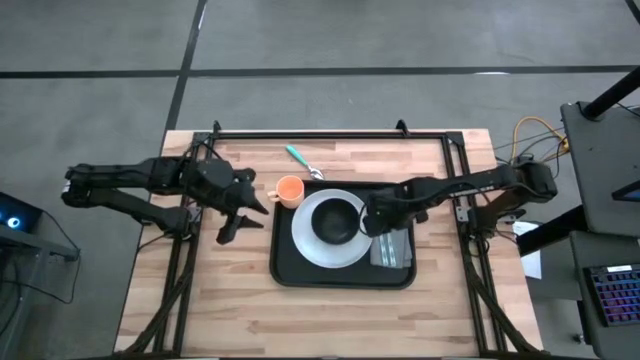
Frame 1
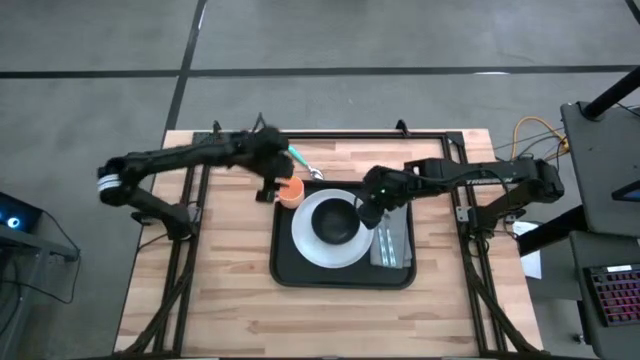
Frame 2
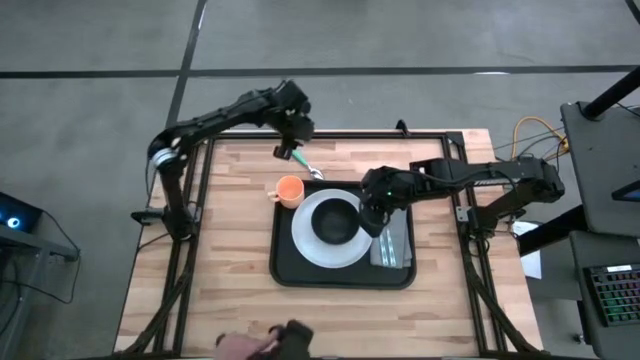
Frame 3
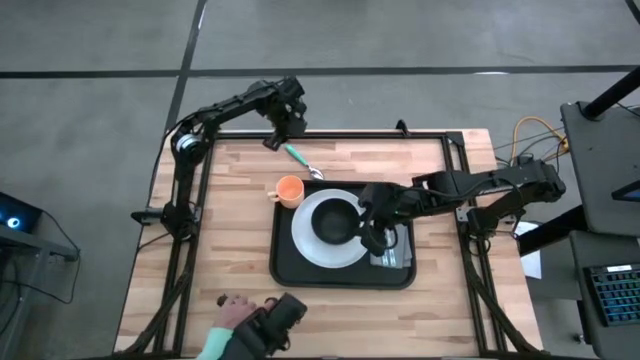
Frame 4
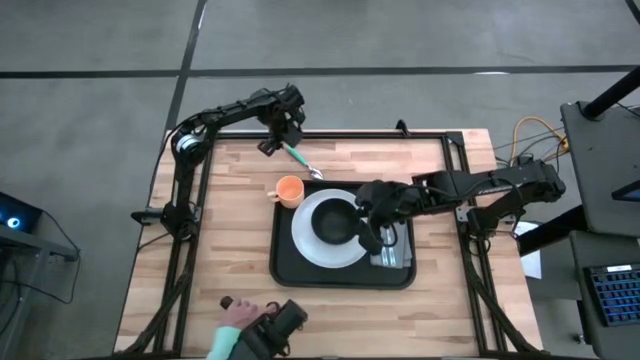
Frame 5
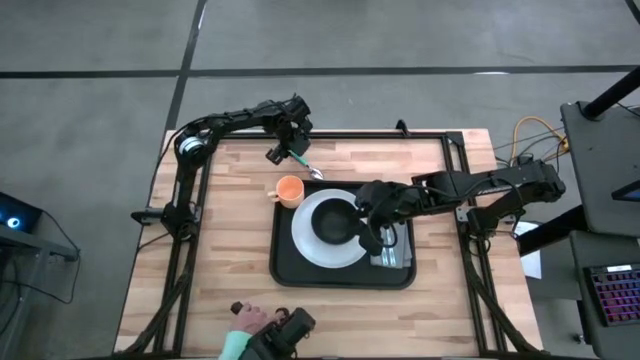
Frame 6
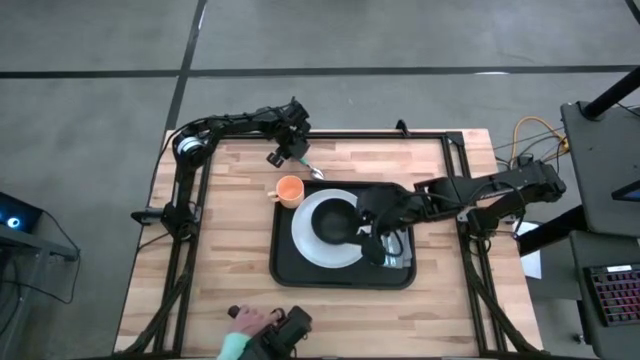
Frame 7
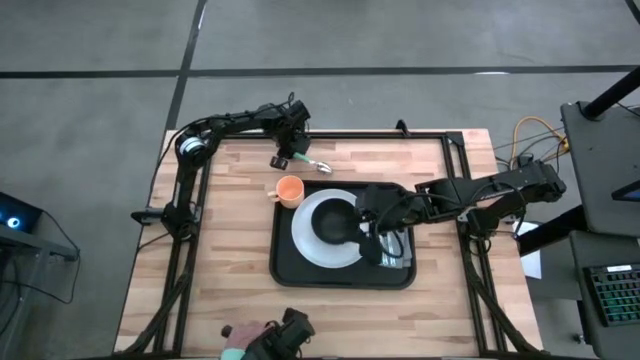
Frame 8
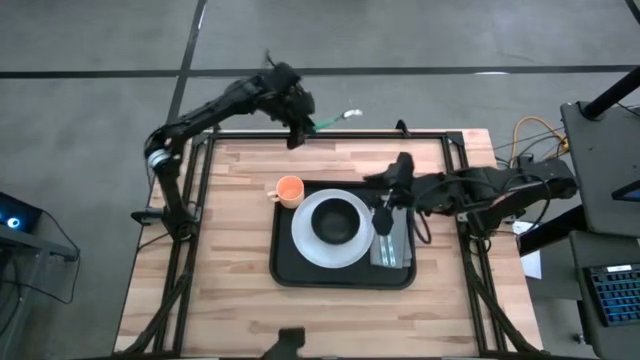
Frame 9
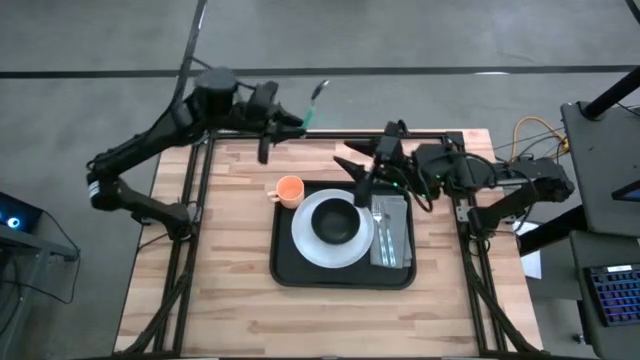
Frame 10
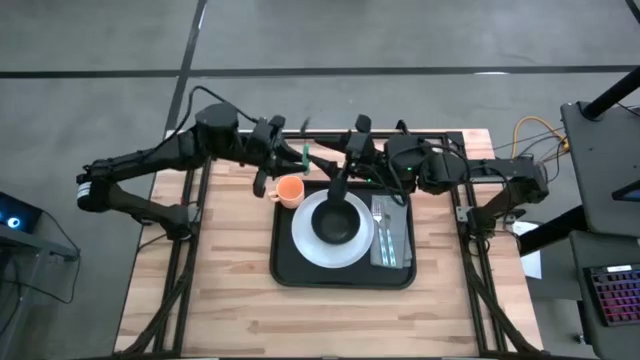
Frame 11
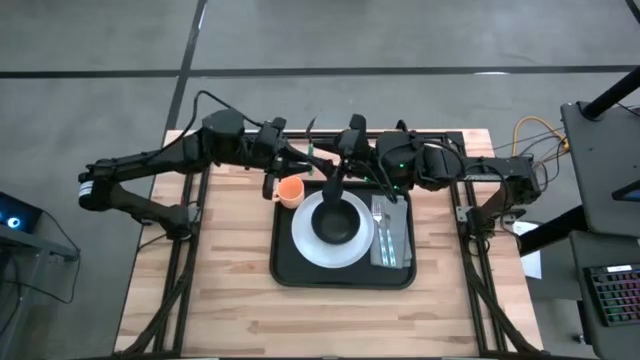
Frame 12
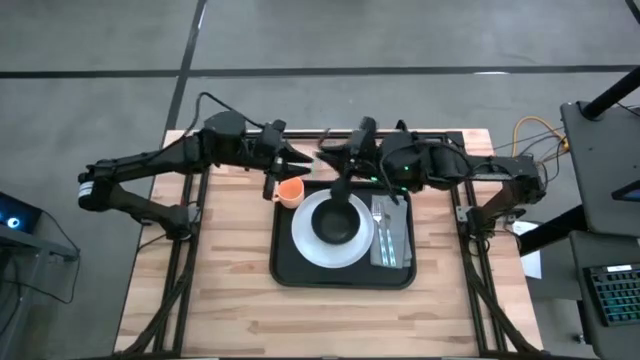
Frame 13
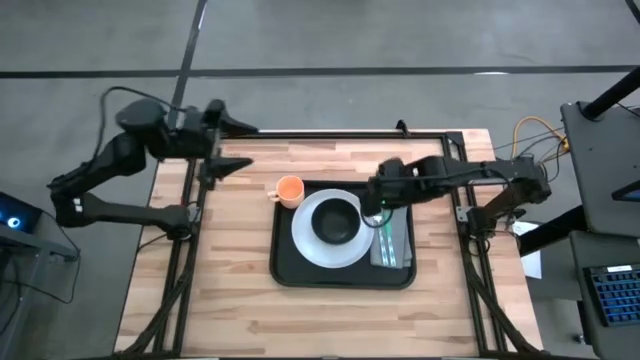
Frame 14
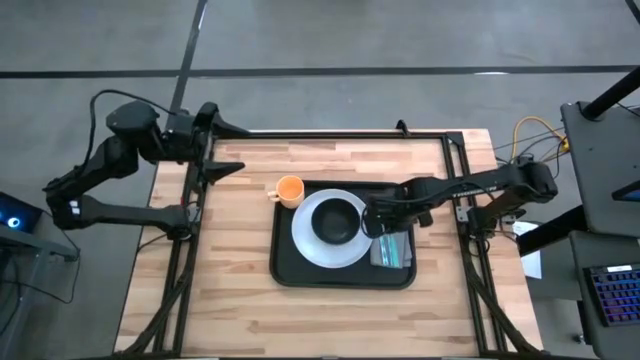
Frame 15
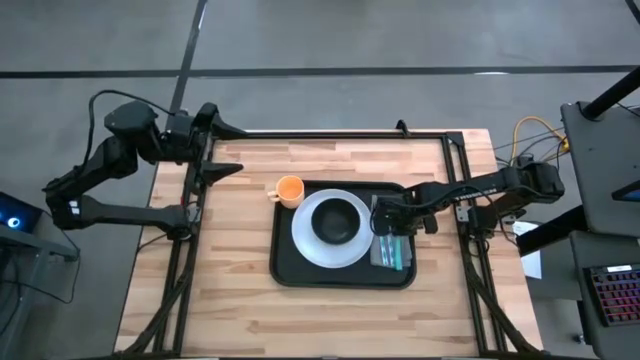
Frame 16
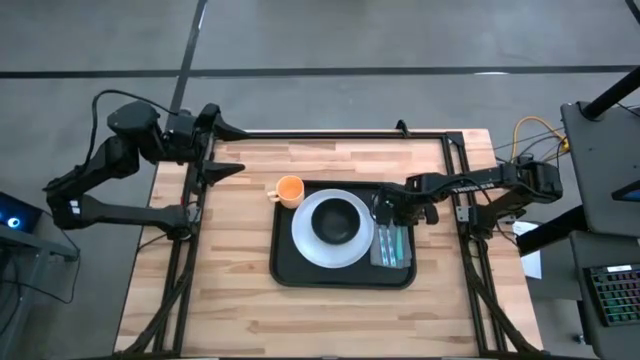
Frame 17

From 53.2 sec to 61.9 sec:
Task: Set up tray
Put the blue spoon on the gray napkin to the right of the blue knife

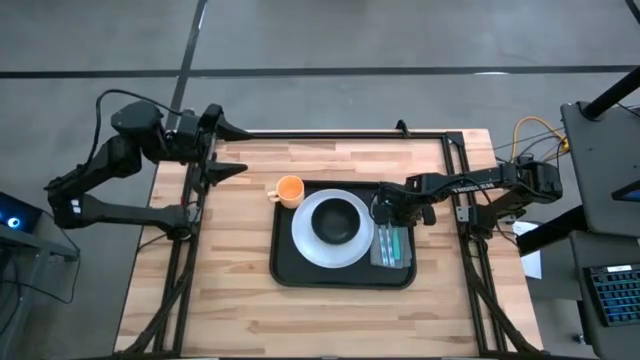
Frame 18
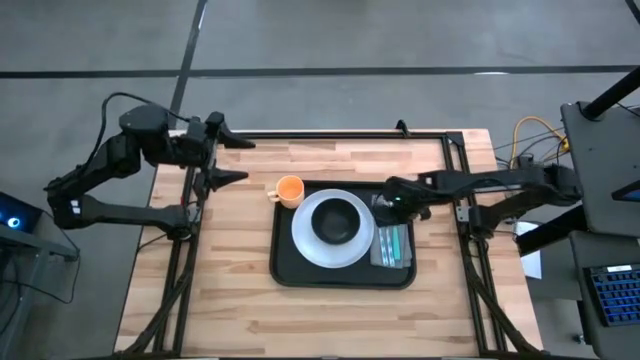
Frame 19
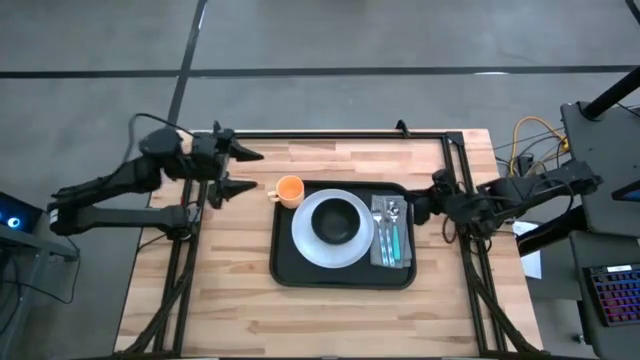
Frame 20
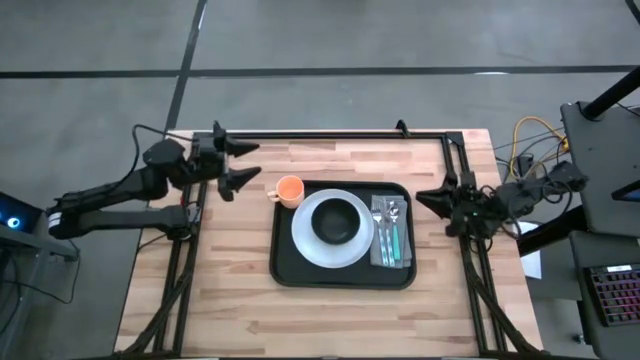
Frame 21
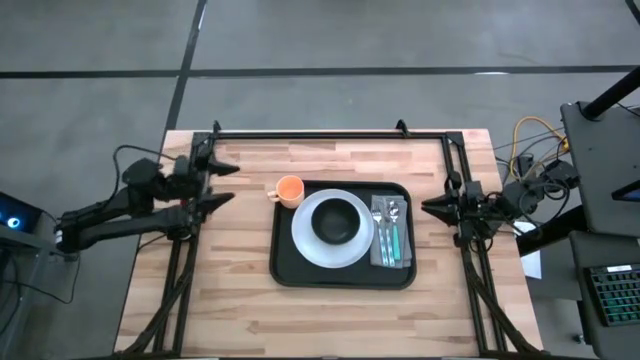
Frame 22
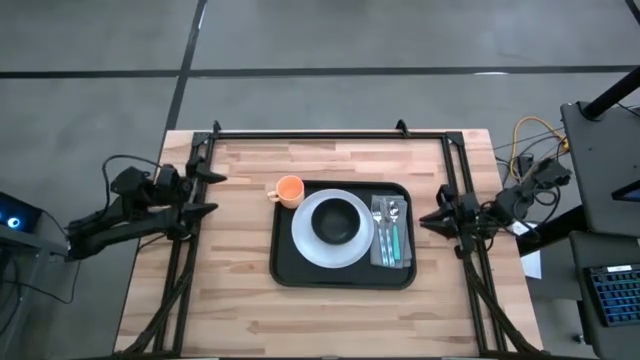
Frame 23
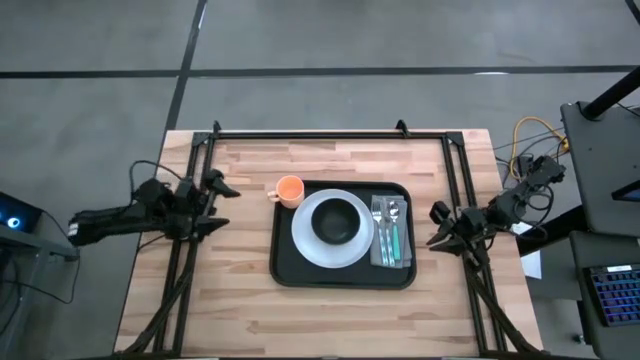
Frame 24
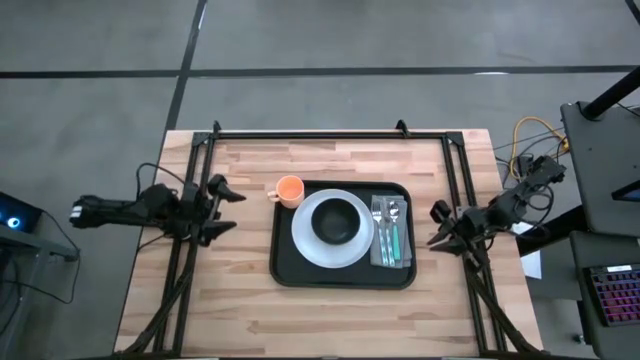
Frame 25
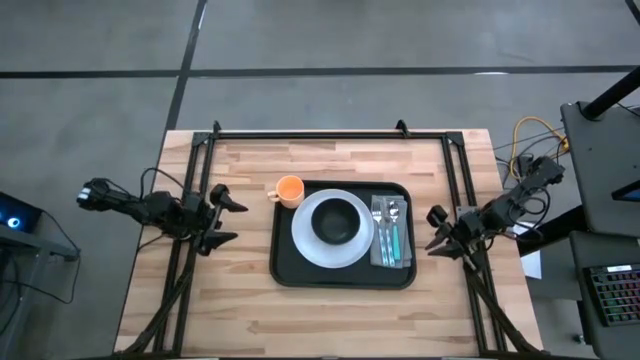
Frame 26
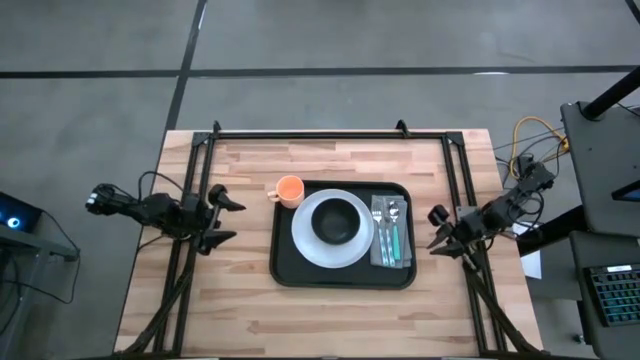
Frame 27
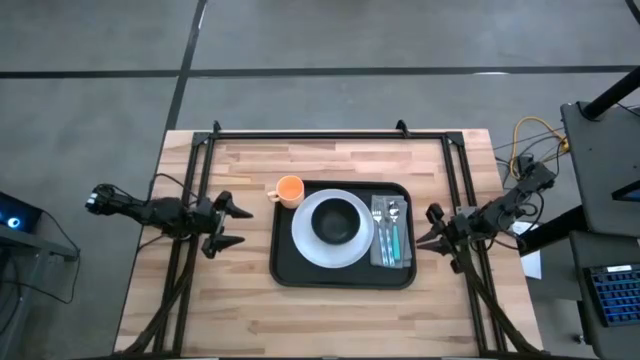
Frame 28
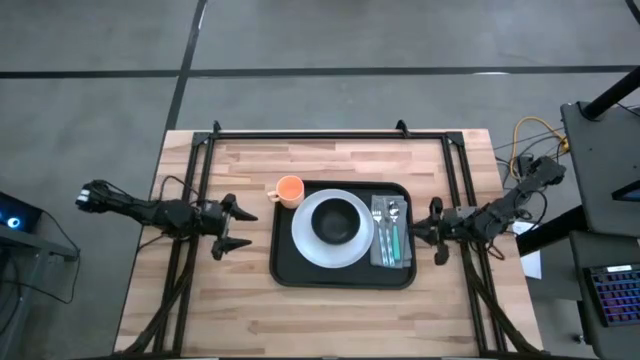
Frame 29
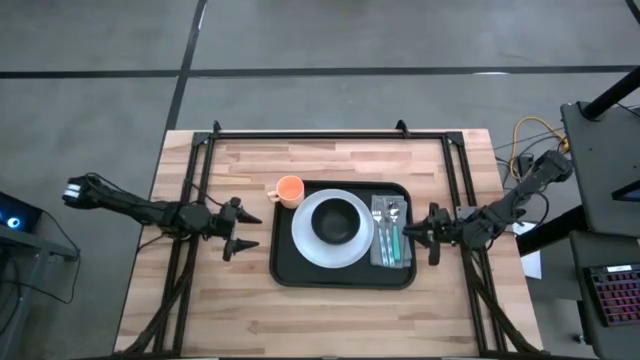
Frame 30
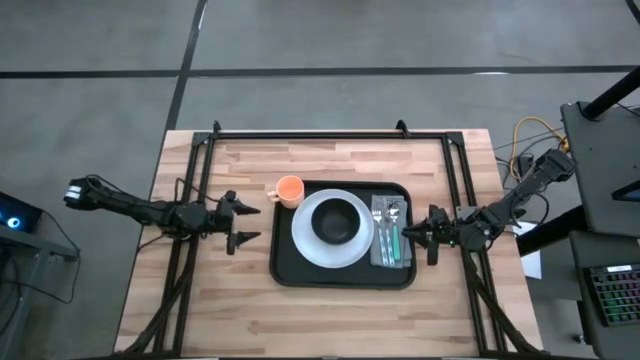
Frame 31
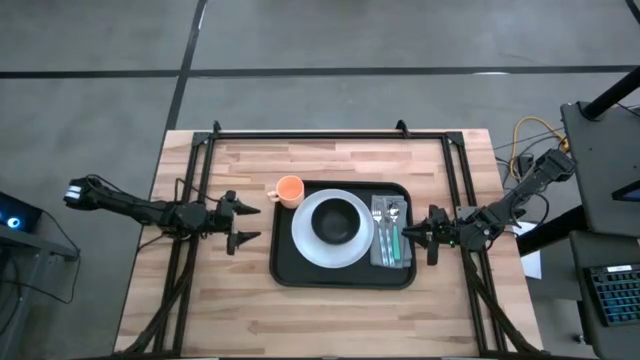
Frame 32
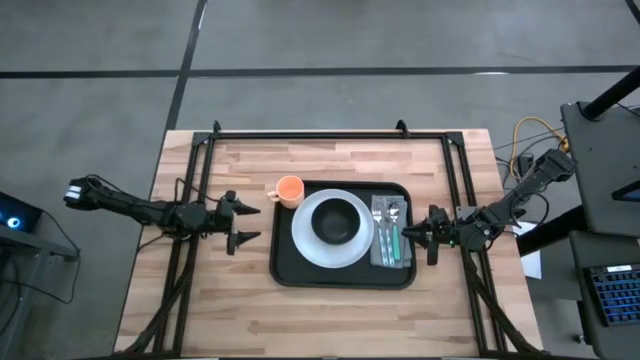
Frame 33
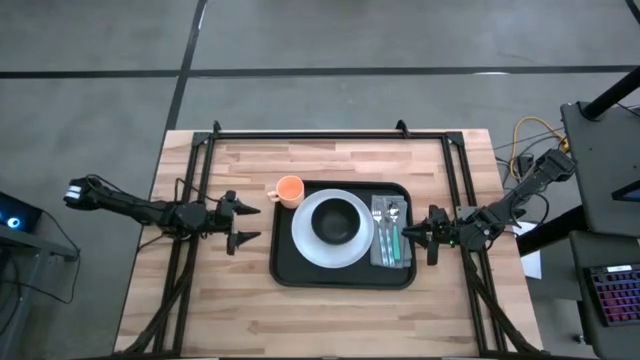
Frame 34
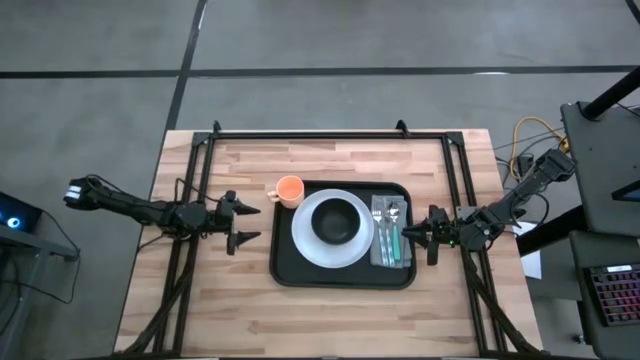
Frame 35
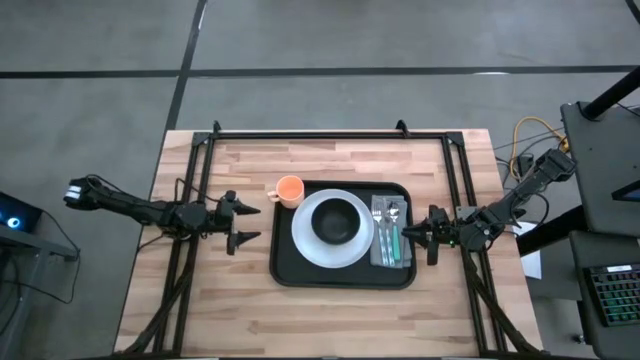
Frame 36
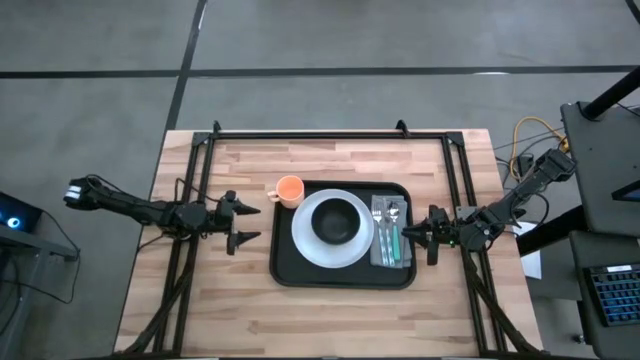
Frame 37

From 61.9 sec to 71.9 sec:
Return to Home Position

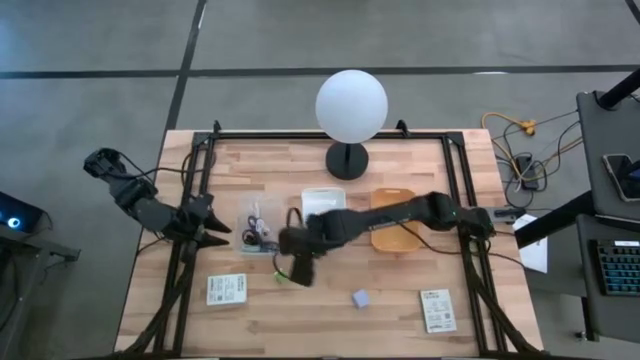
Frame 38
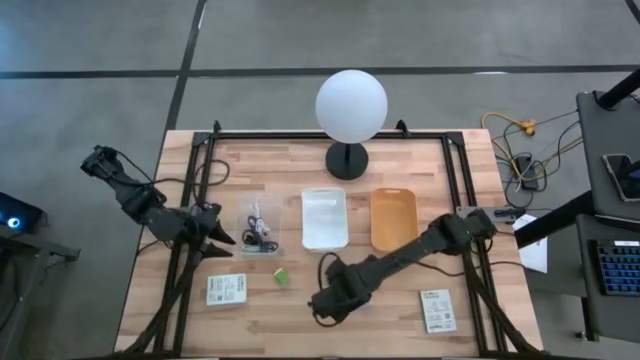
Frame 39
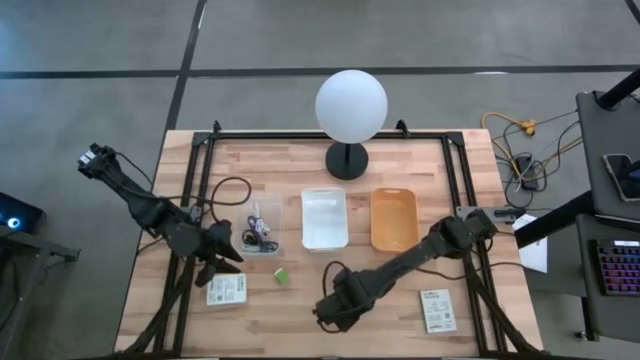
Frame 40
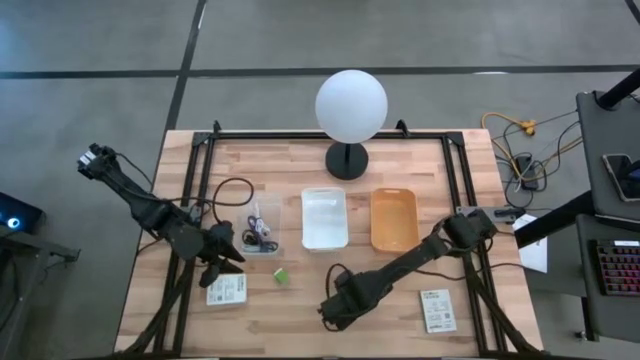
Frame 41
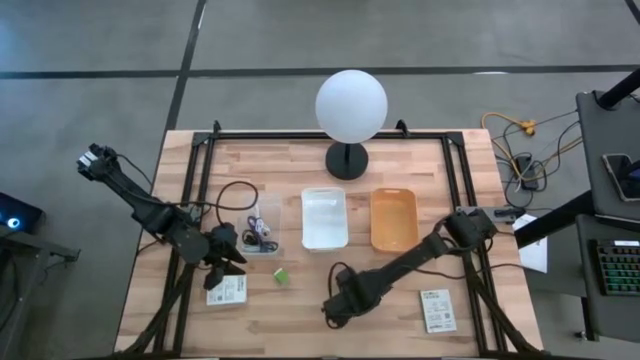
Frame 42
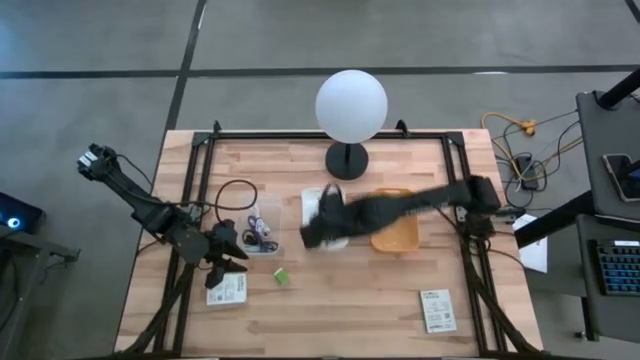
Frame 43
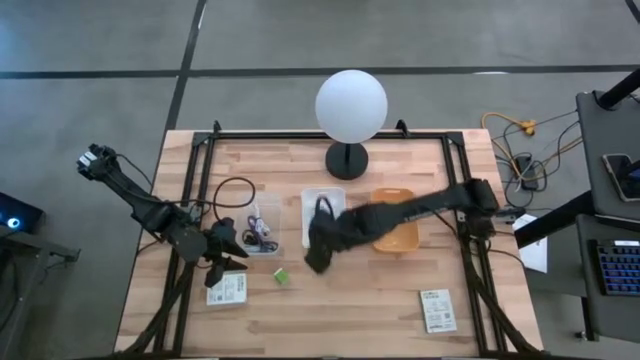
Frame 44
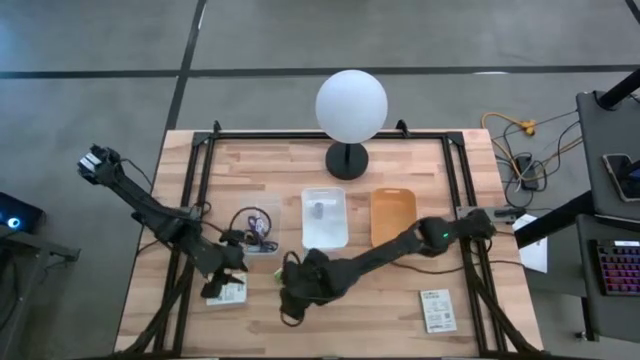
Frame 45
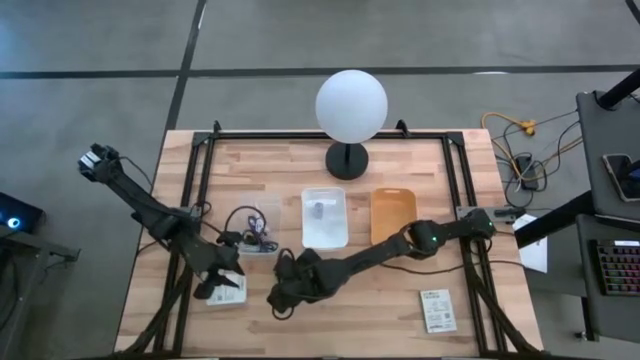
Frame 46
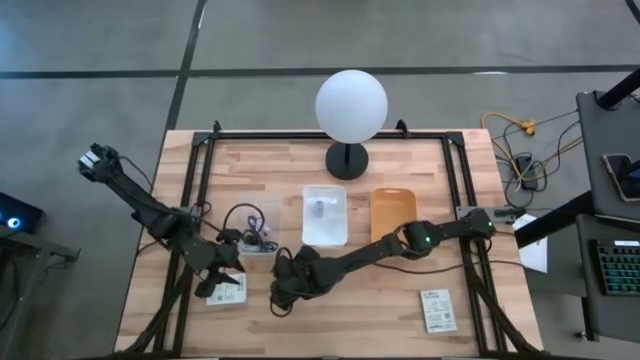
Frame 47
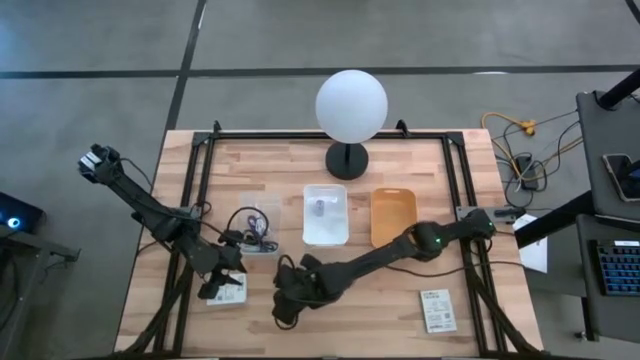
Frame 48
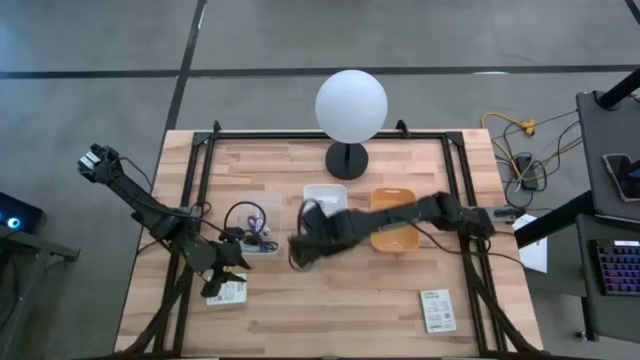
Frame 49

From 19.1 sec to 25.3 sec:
Task: Pick and place items into bin
Put the gray charger adapter into the white bin
